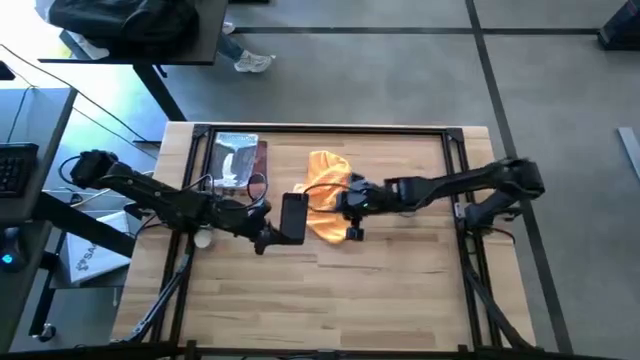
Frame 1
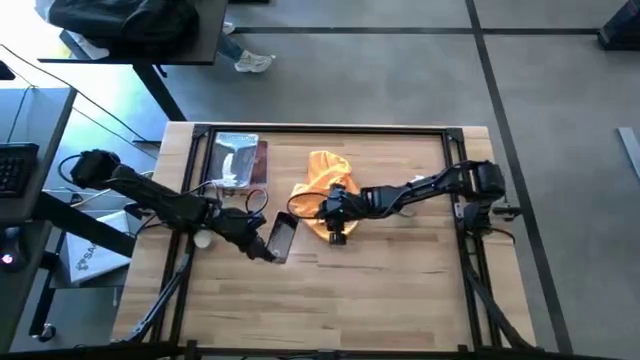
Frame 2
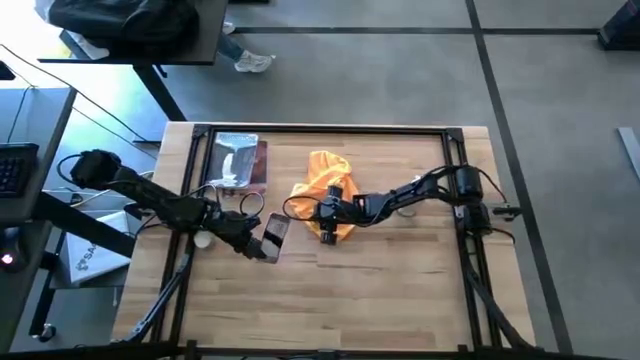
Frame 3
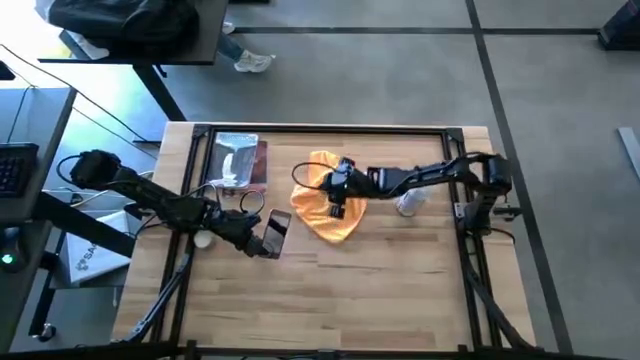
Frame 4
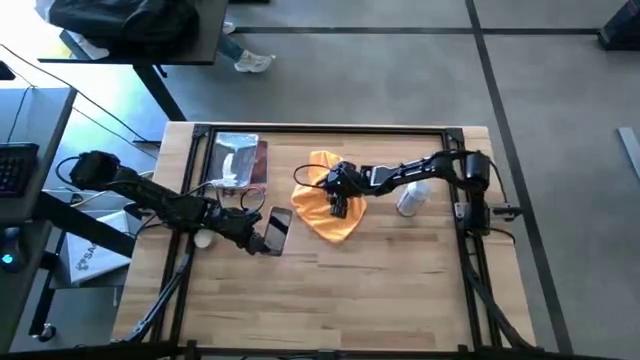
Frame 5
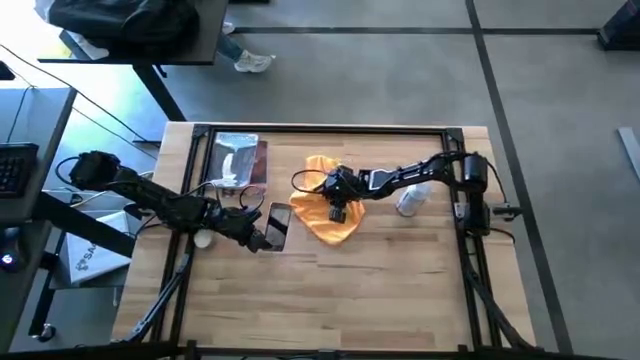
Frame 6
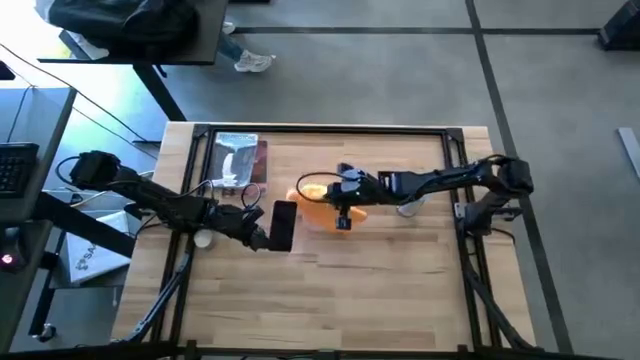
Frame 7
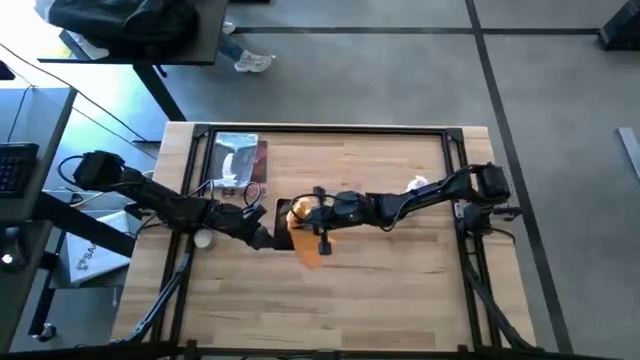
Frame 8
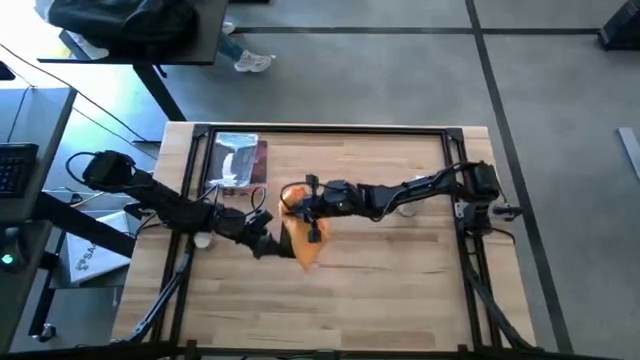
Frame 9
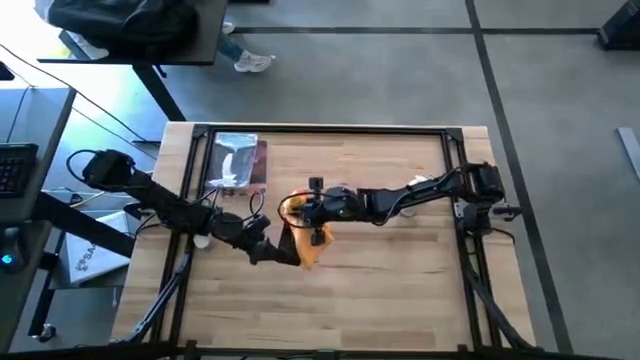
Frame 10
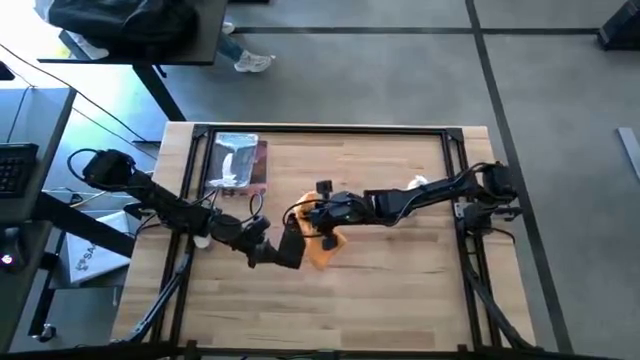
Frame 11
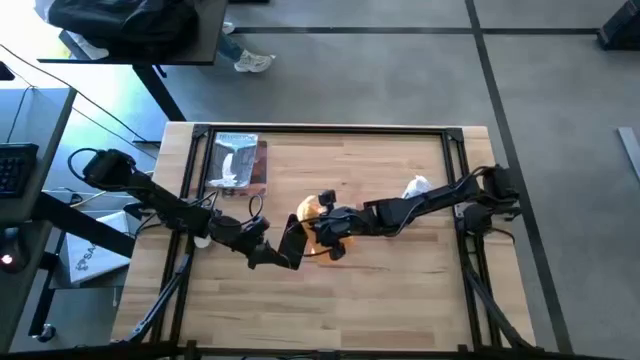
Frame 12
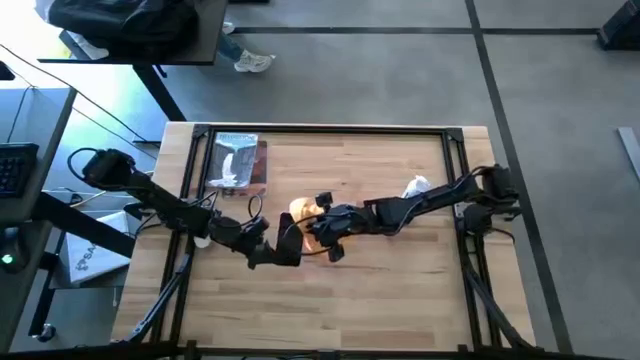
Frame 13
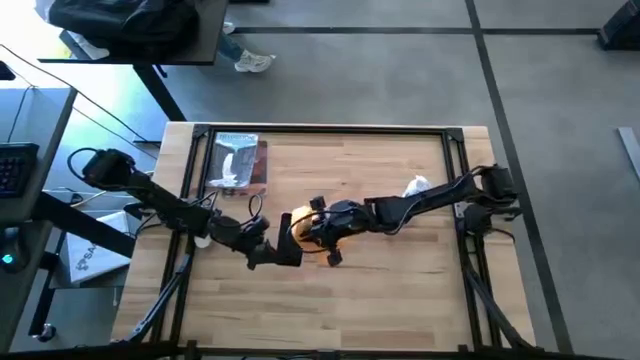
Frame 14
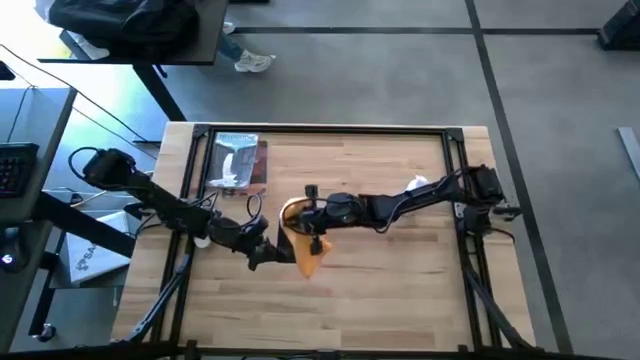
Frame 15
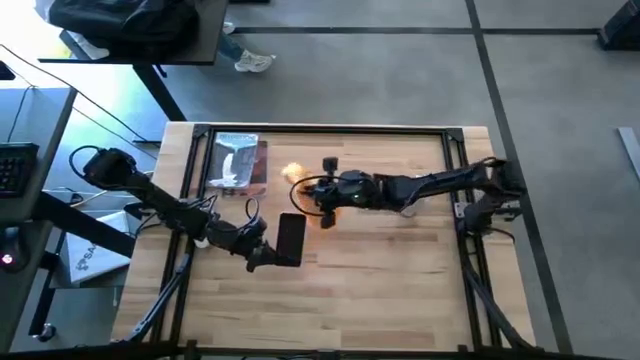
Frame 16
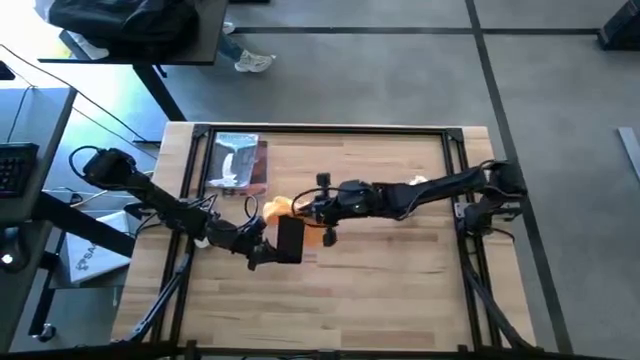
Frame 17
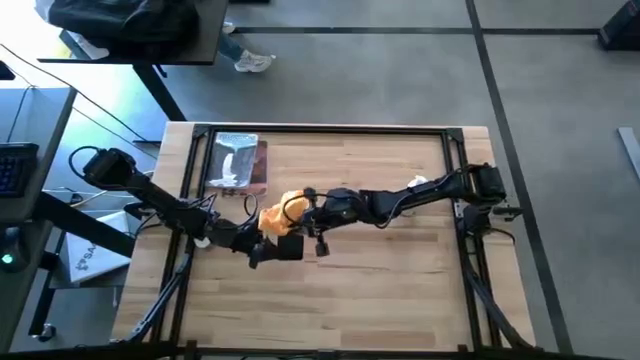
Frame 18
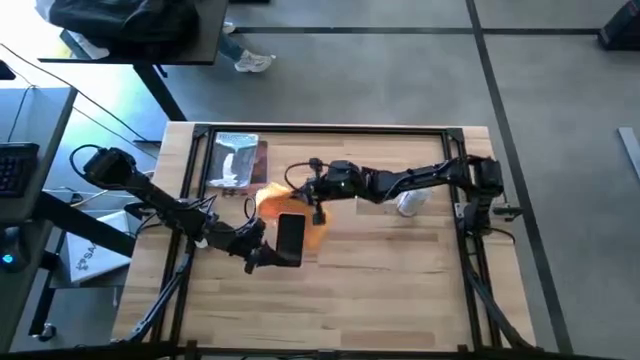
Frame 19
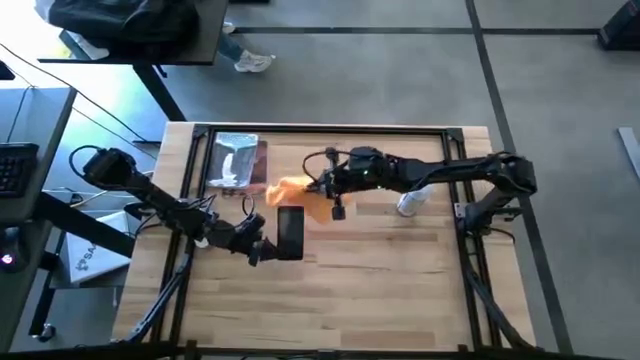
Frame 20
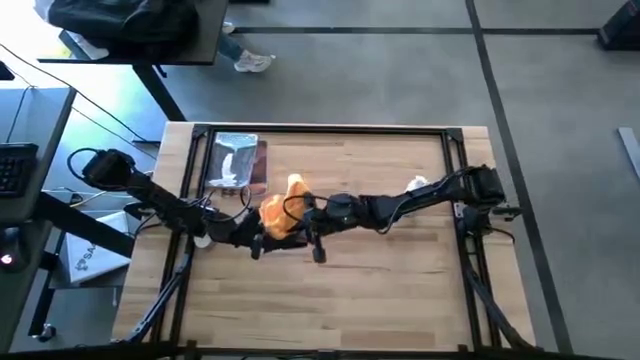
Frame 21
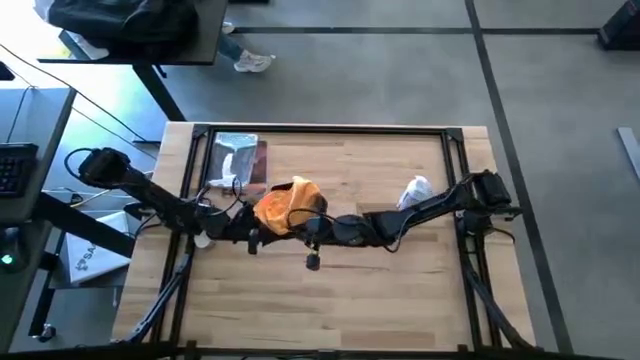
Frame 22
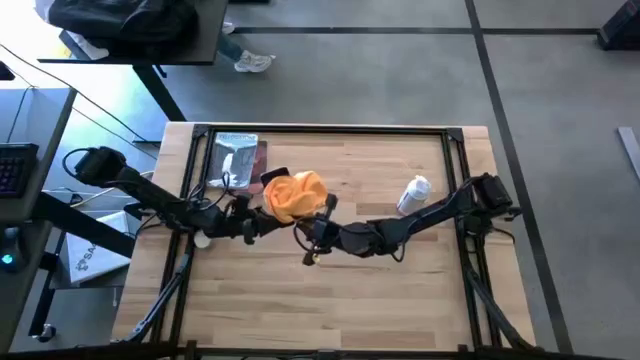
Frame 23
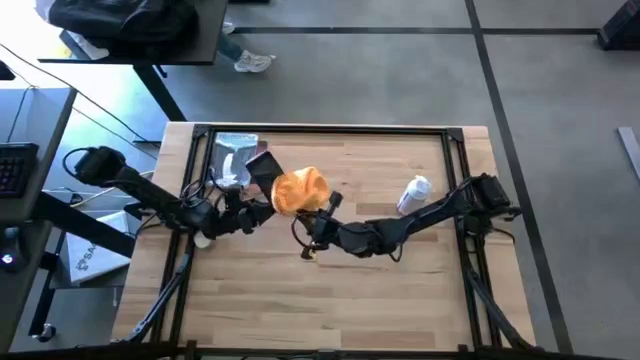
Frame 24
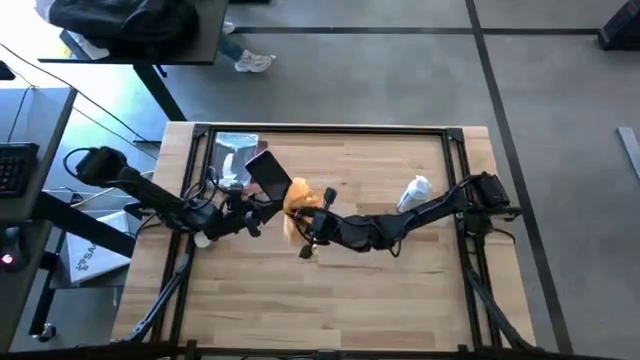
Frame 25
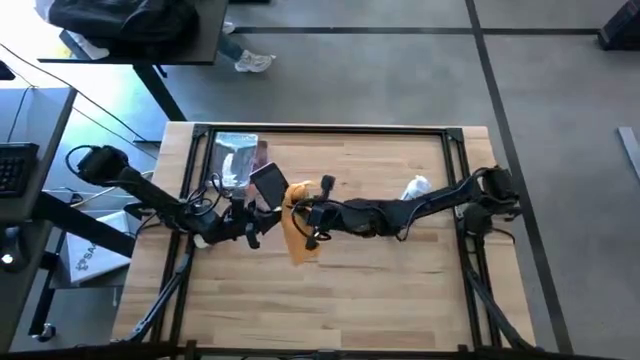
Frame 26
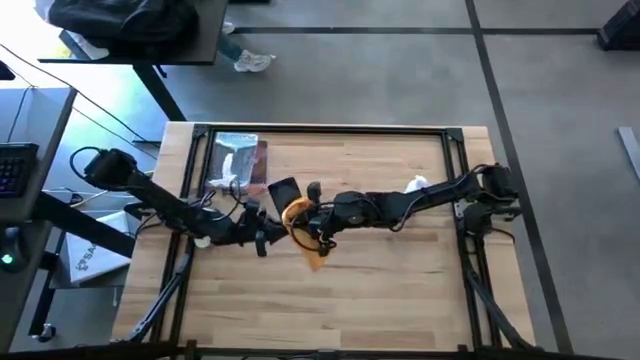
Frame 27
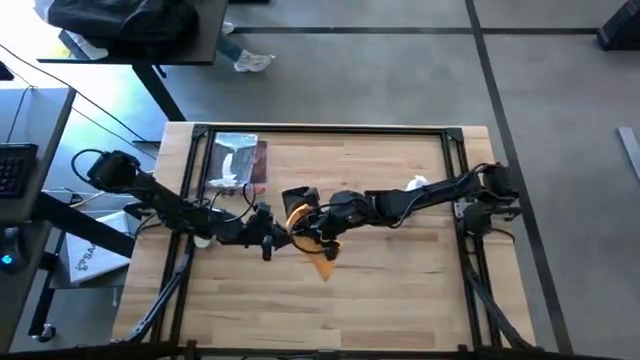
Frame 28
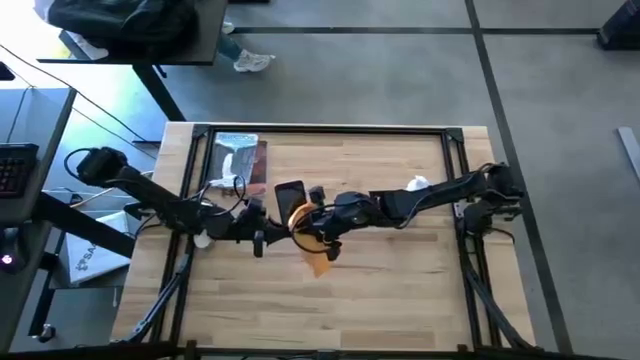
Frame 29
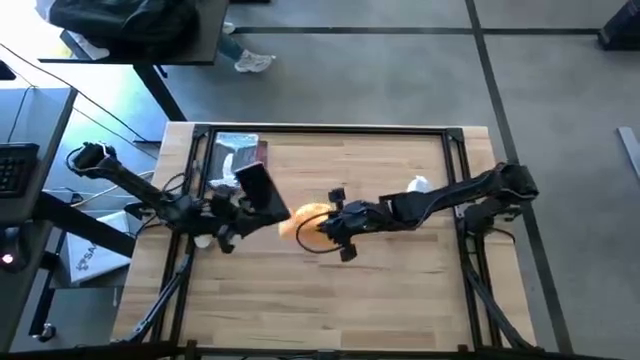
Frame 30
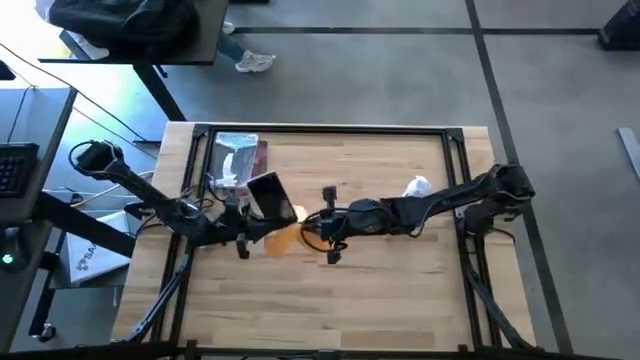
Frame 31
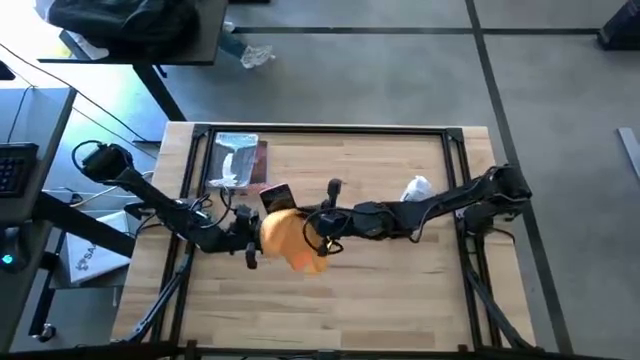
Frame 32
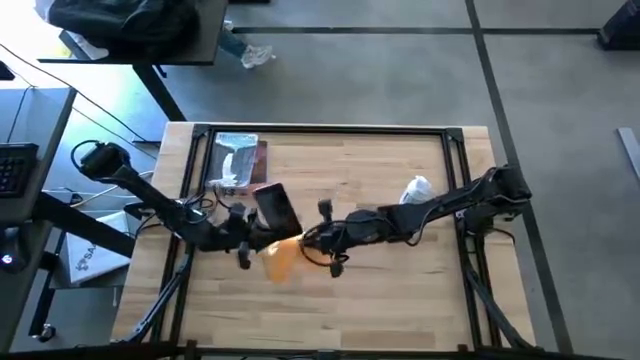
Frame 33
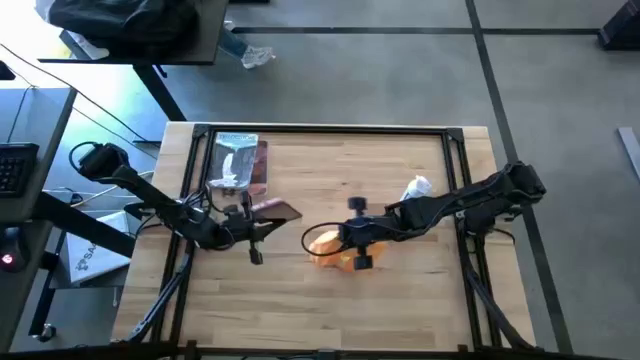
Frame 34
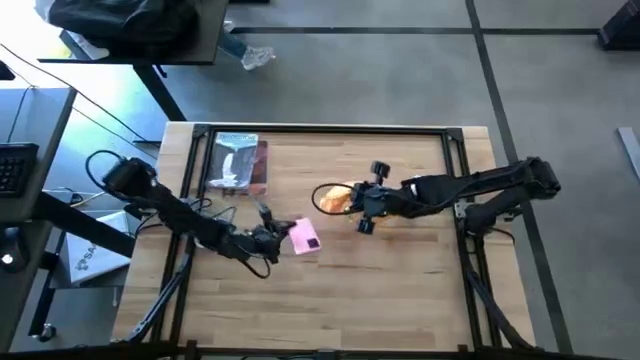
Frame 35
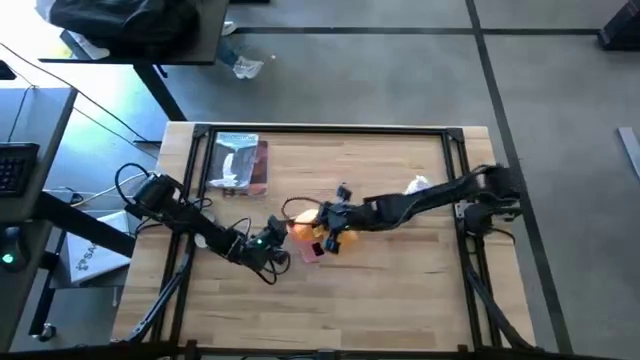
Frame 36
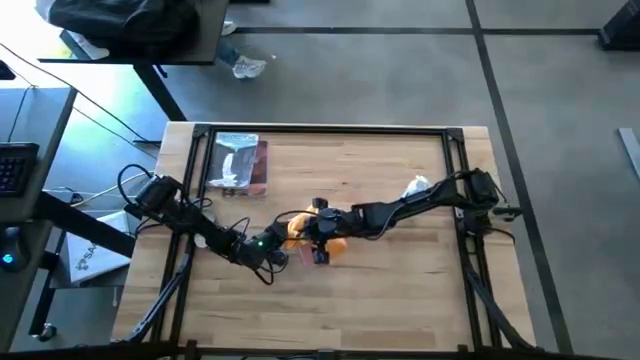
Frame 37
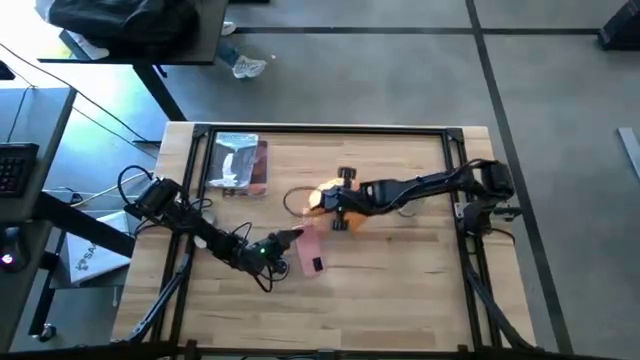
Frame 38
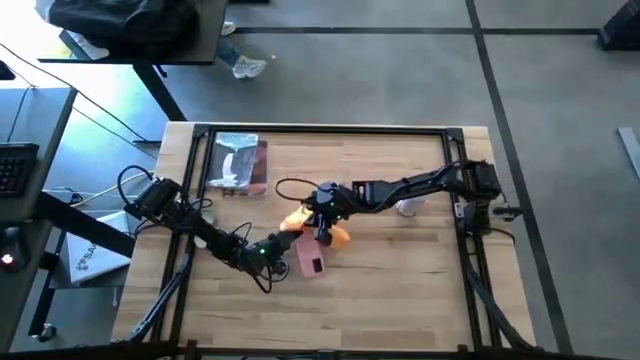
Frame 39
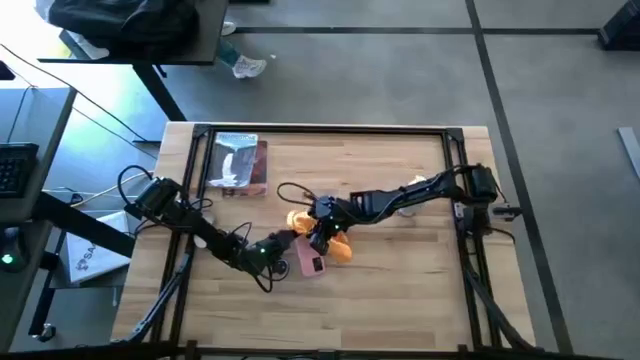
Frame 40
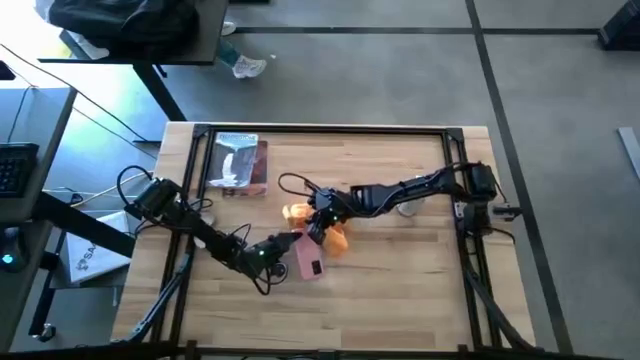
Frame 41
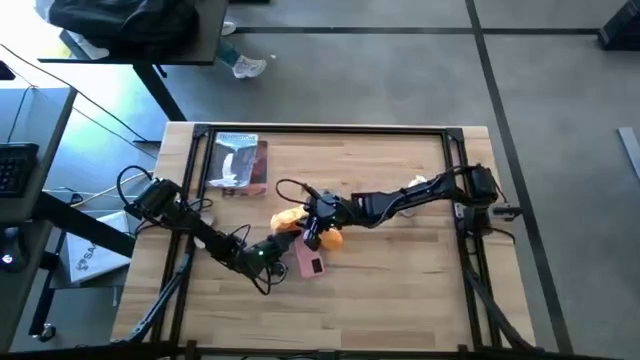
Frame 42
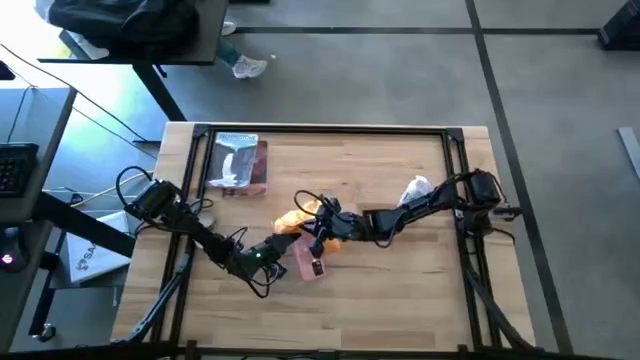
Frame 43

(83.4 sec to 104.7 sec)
Task: Apply microfiber cloth
Wipe the front and back of the cellphone with the yellow microfiber cloth
